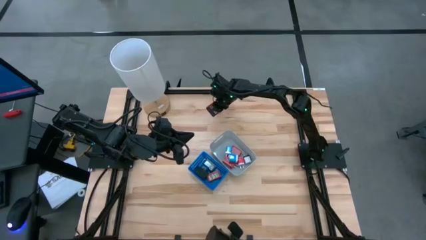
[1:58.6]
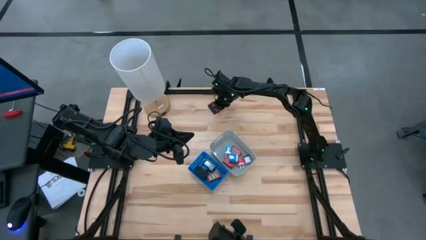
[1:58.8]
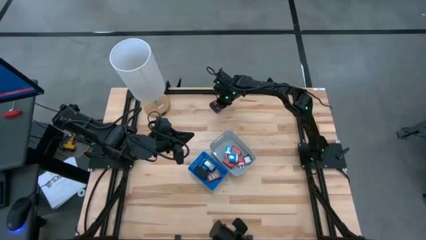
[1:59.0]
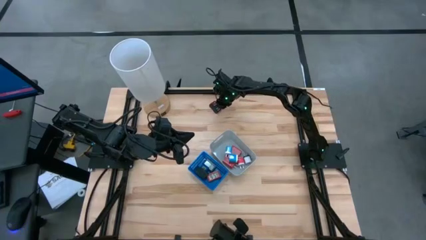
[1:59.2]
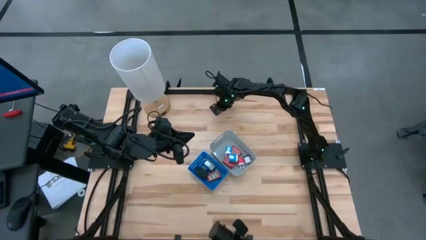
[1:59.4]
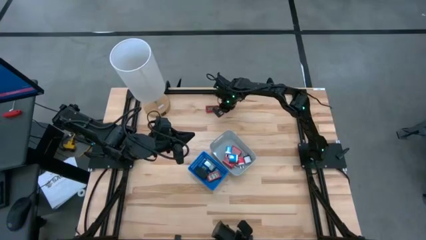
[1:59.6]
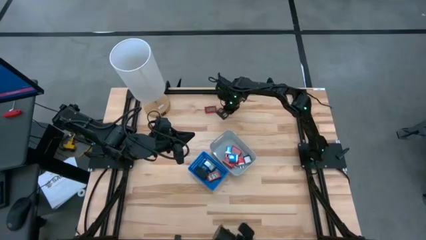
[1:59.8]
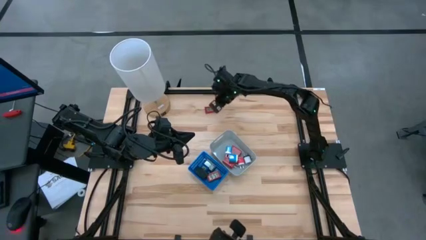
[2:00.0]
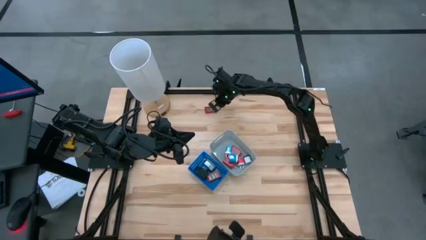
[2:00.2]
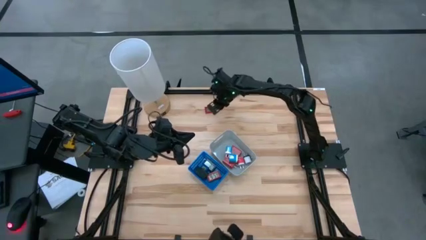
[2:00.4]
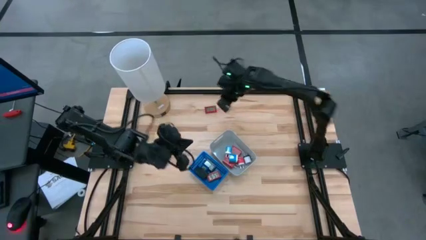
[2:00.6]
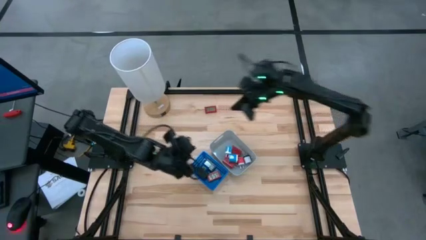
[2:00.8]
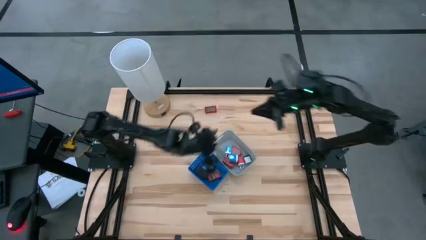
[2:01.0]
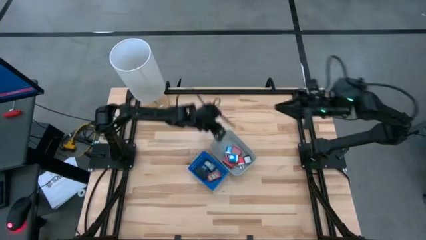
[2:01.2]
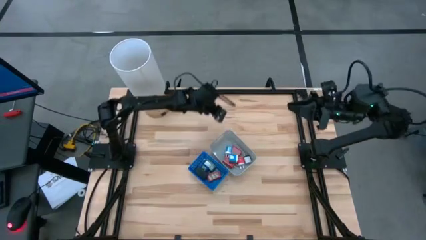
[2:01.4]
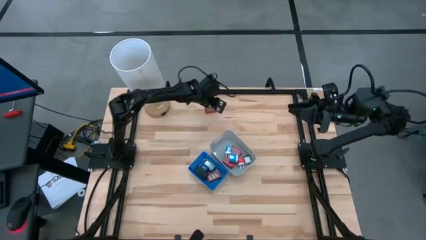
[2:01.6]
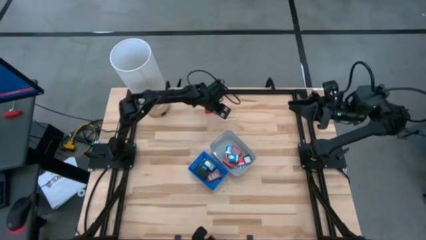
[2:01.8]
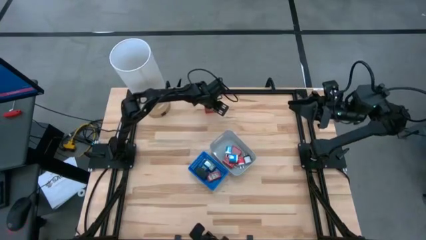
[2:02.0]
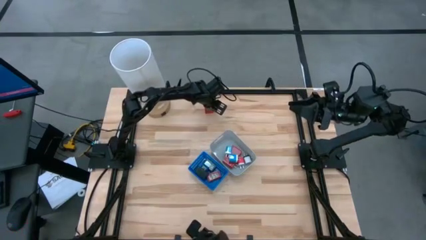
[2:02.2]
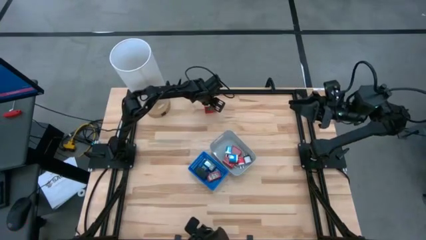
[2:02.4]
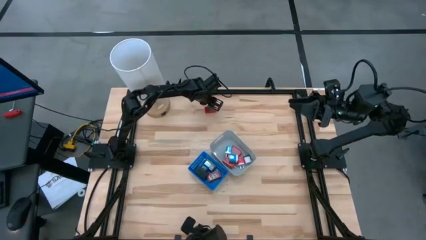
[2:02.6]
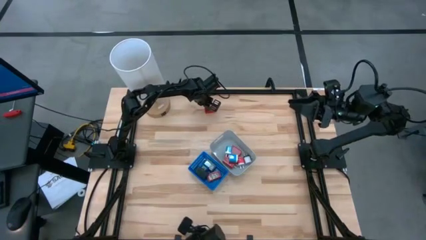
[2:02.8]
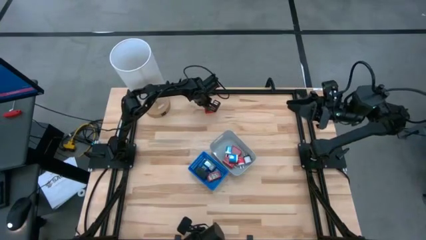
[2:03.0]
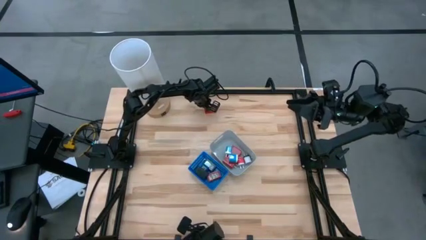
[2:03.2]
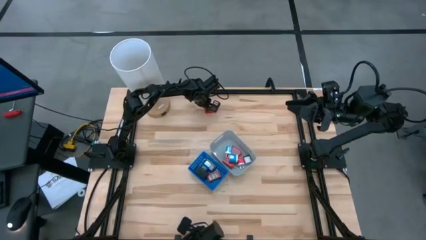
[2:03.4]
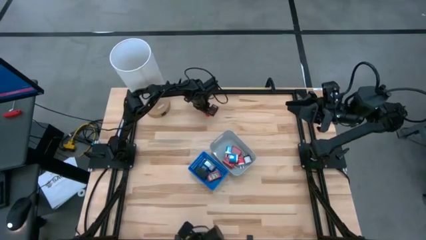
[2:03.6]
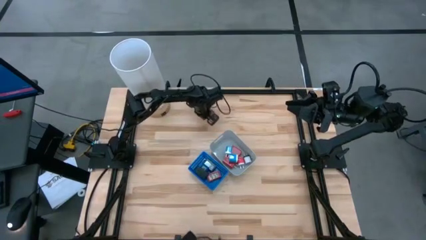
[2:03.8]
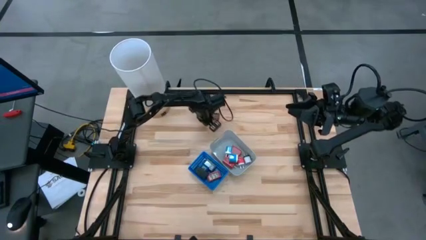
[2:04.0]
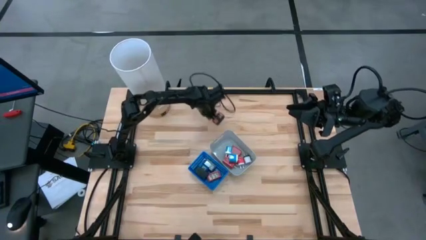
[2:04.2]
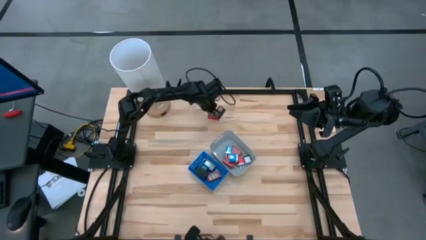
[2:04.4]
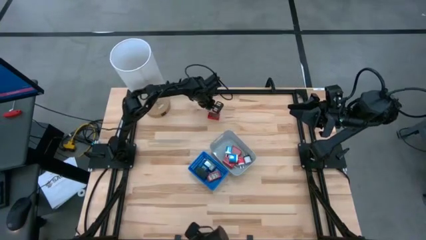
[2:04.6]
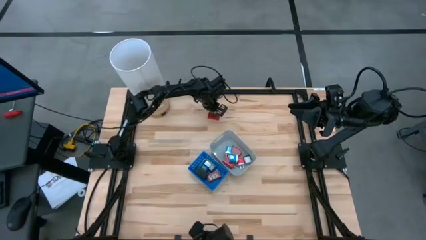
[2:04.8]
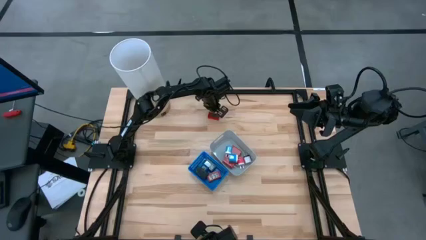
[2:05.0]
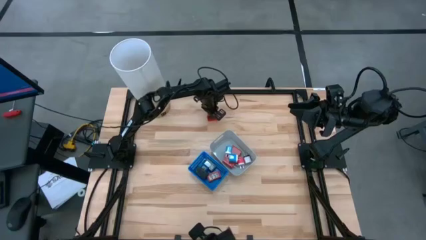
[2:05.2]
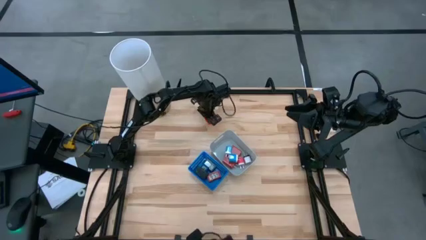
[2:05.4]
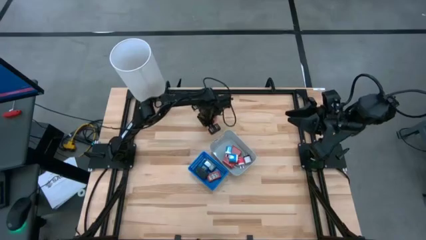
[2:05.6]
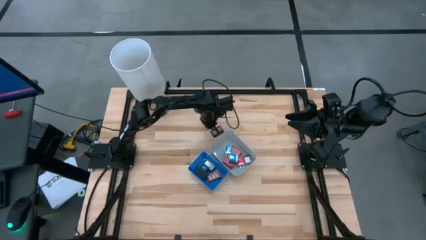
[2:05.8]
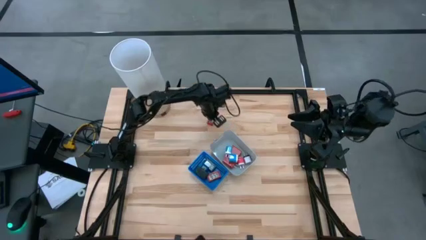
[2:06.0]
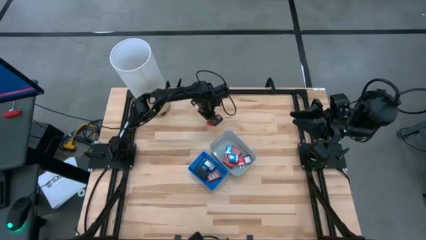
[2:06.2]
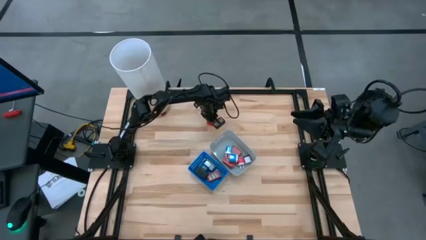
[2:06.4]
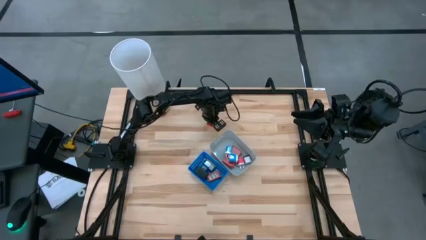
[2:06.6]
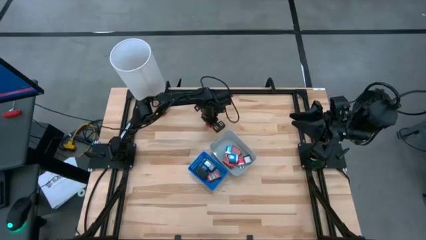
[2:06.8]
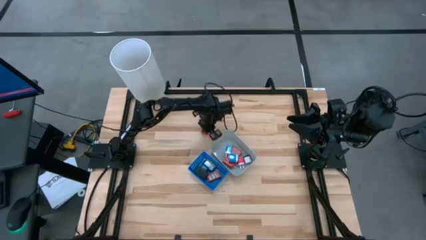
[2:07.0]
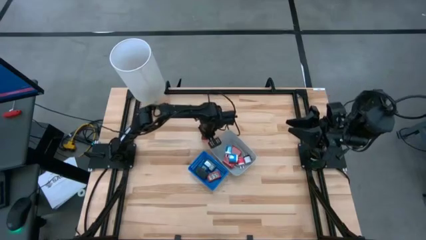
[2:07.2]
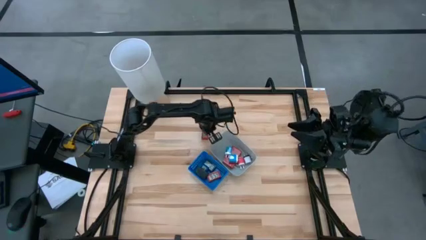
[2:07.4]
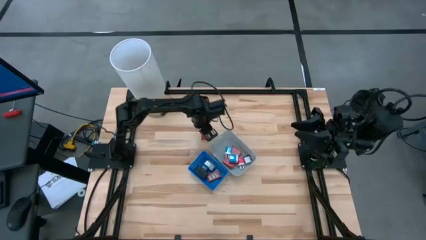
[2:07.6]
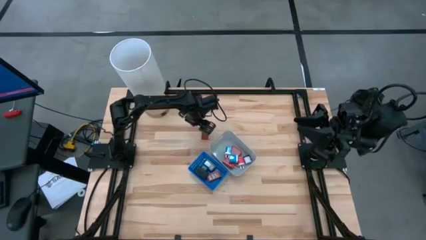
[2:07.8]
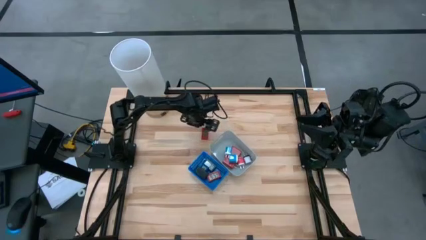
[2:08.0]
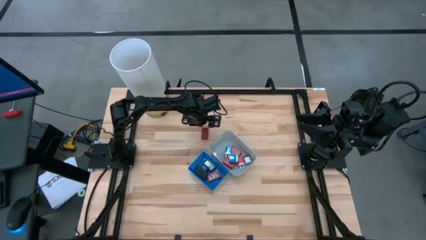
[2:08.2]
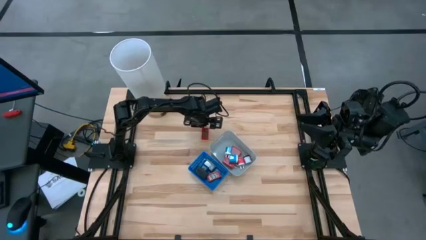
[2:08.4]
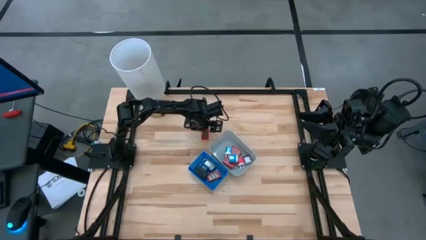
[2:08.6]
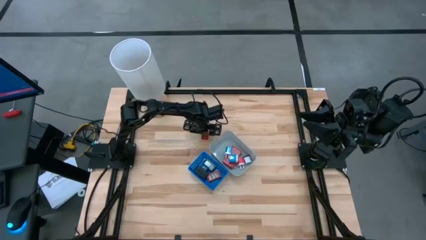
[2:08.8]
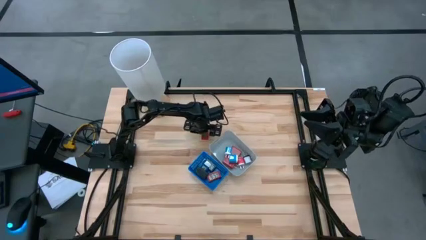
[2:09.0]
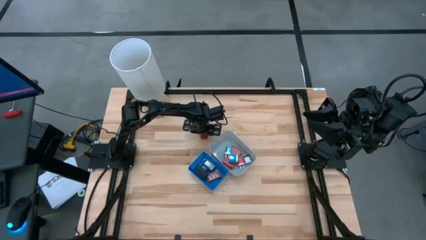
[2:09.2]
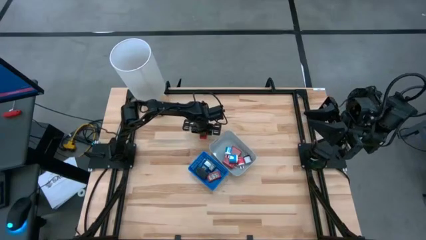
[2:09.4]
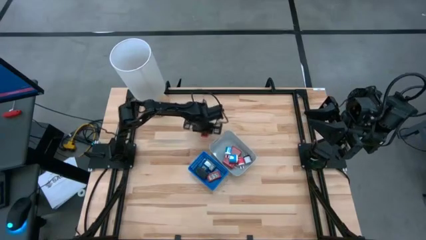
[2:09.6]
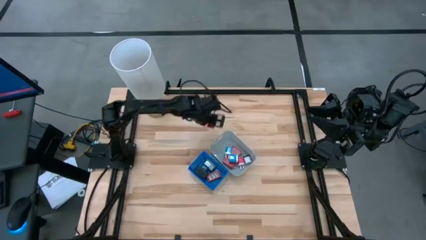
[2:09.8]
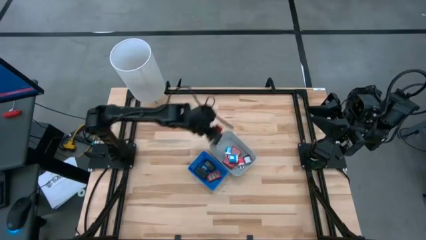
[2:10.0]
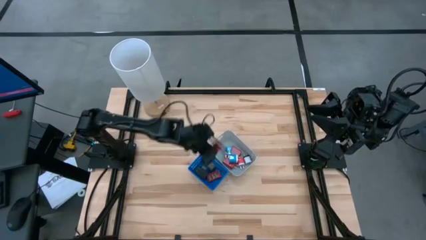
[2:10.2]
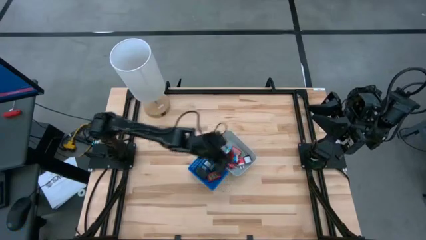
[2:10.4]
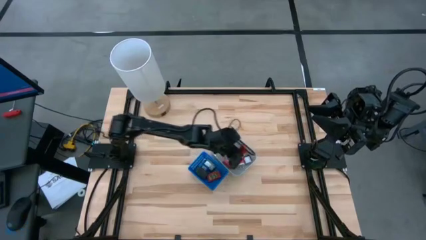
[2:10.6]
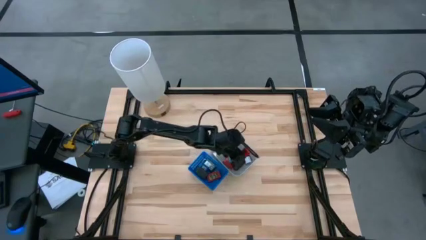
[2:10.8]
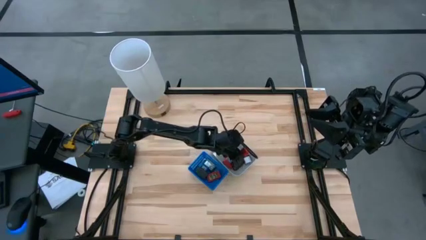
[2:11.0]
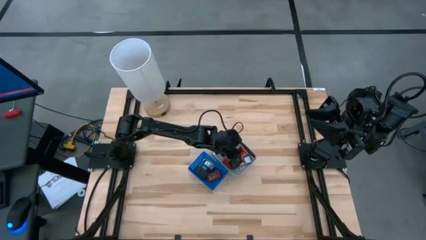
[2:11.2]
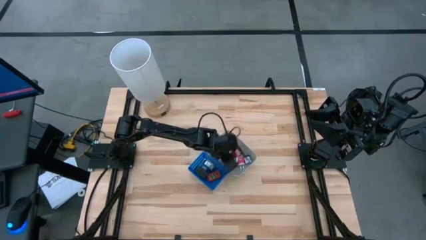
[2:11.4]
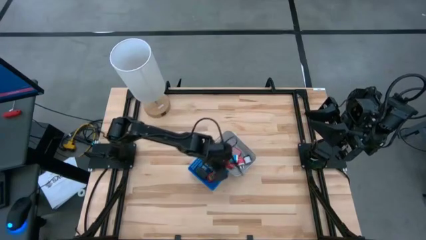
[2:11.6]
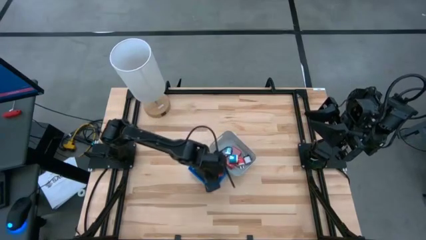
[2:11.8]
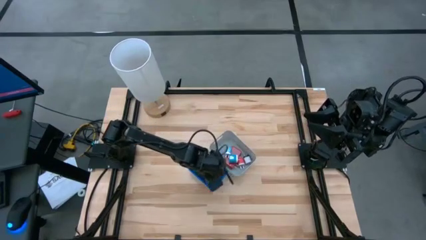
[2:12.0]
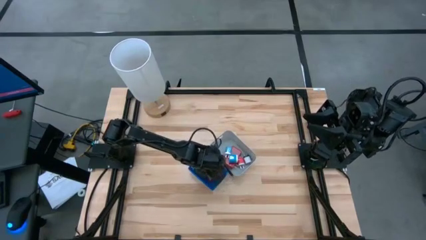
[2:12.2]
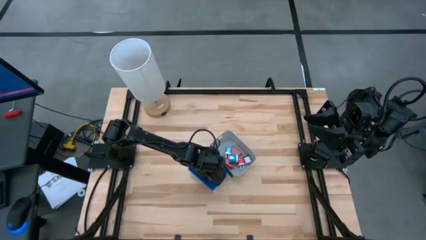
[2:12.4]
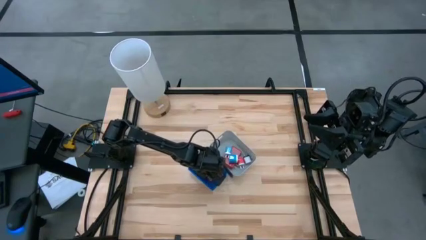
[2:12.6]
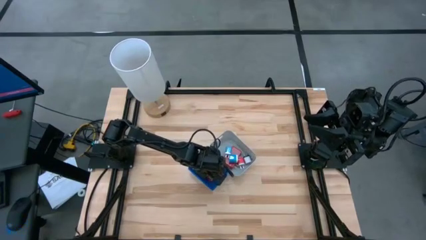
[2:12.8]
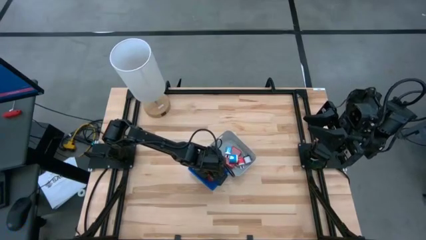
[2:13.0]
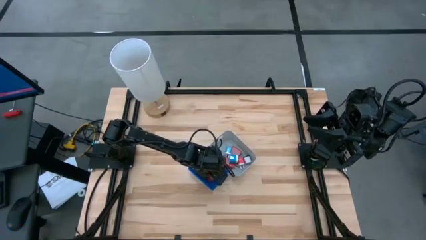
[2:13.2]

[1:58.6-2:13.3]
Task: Pick & Place Office items
Put the red digital timer into the blue bin
